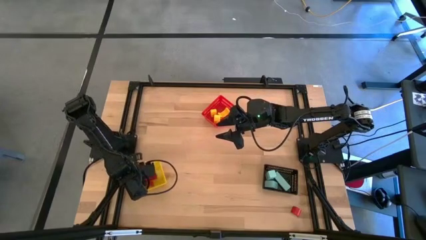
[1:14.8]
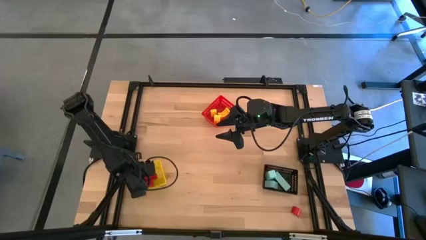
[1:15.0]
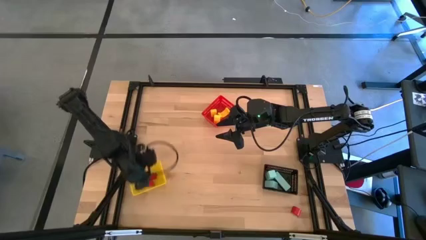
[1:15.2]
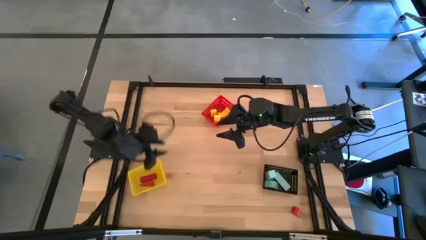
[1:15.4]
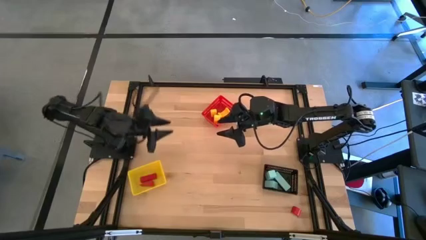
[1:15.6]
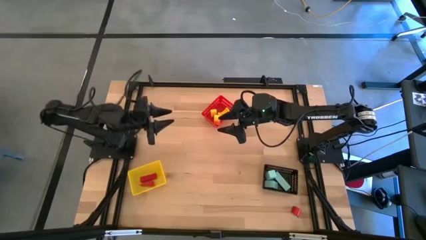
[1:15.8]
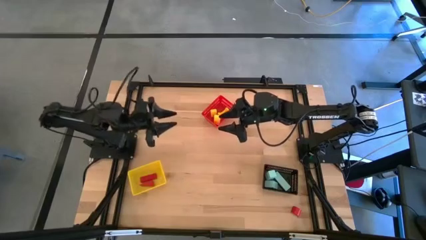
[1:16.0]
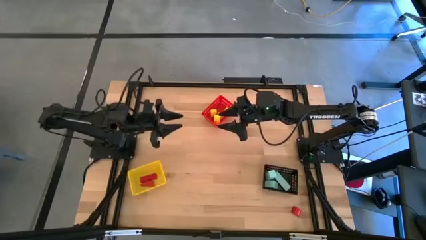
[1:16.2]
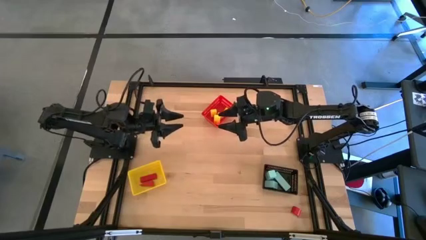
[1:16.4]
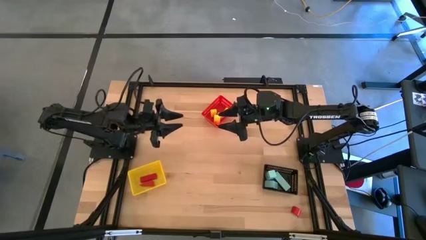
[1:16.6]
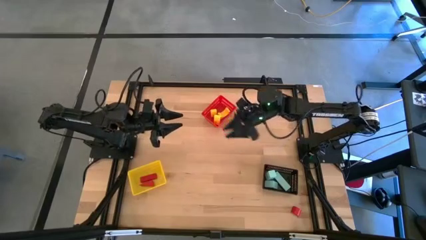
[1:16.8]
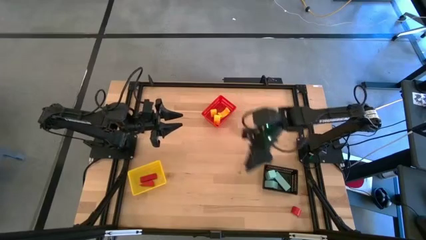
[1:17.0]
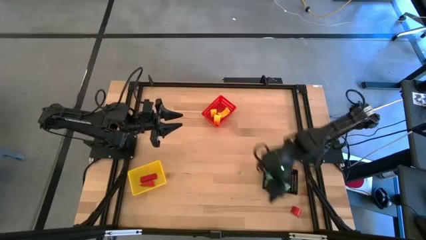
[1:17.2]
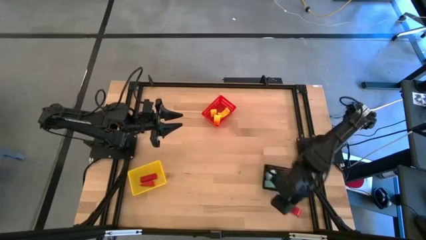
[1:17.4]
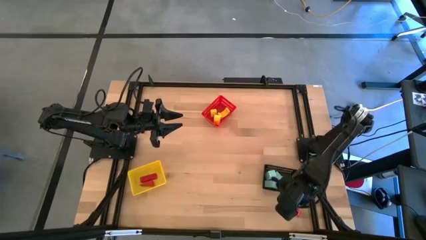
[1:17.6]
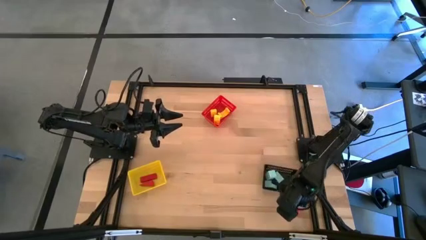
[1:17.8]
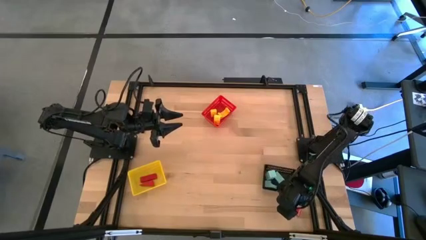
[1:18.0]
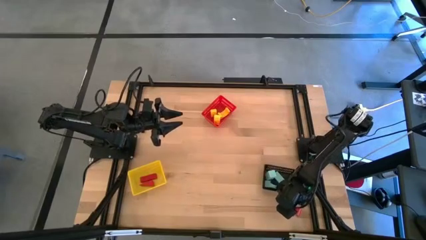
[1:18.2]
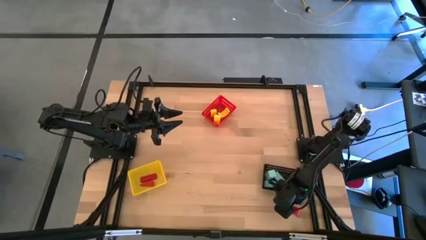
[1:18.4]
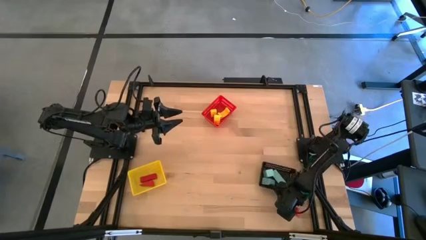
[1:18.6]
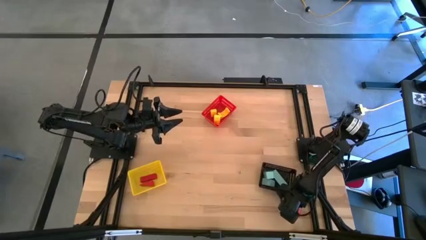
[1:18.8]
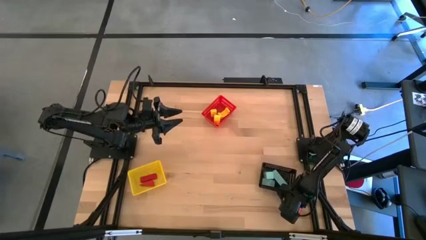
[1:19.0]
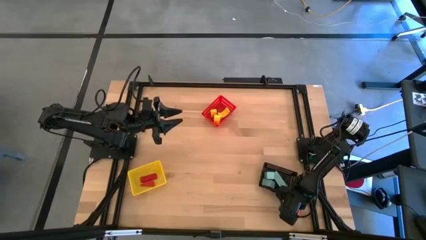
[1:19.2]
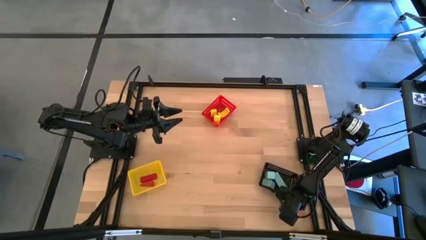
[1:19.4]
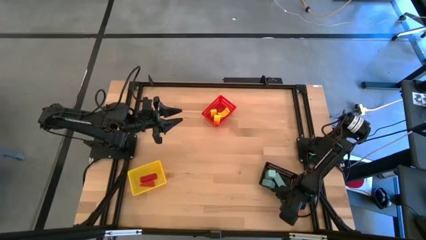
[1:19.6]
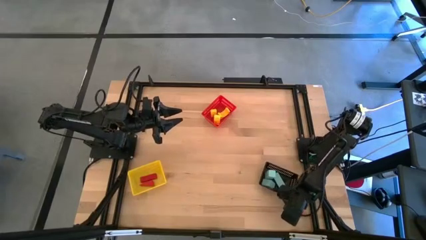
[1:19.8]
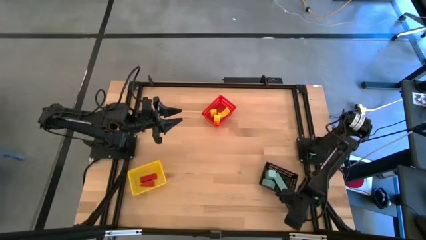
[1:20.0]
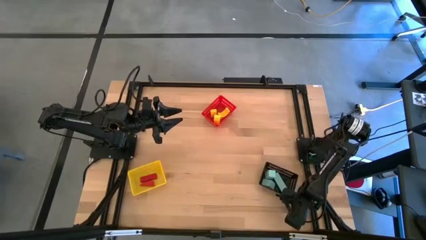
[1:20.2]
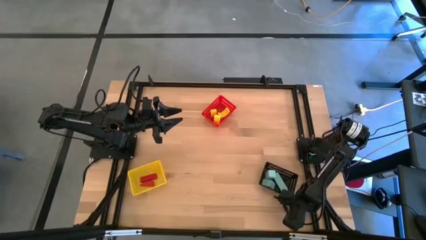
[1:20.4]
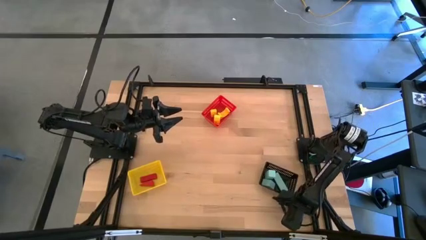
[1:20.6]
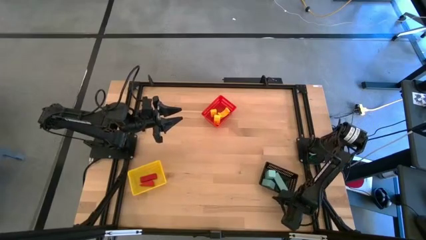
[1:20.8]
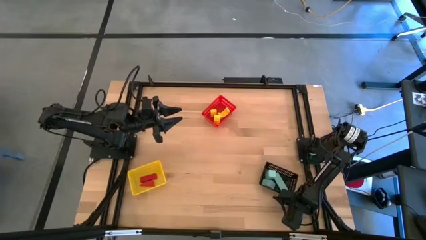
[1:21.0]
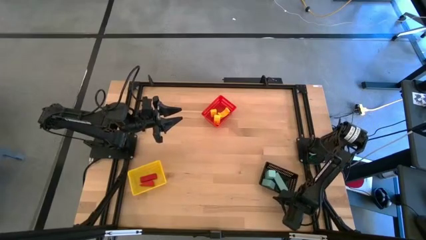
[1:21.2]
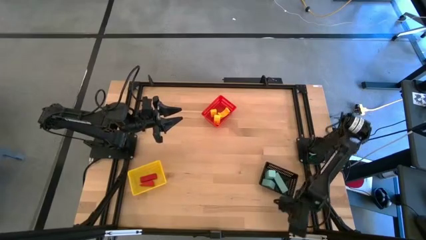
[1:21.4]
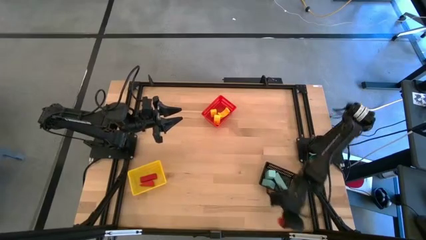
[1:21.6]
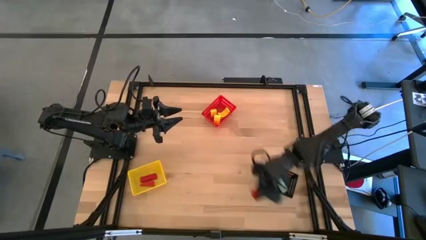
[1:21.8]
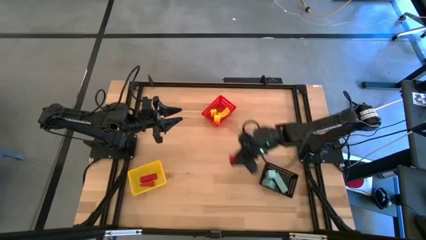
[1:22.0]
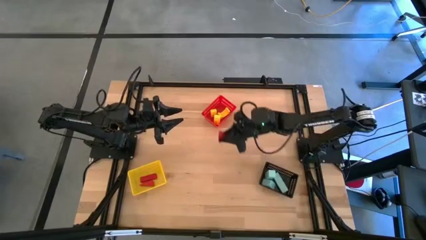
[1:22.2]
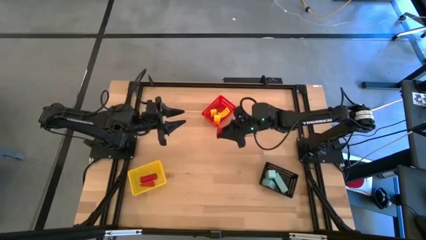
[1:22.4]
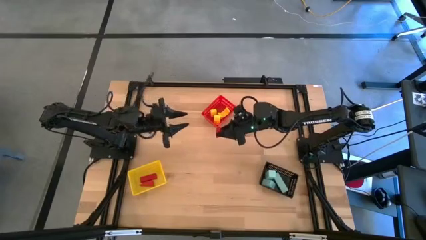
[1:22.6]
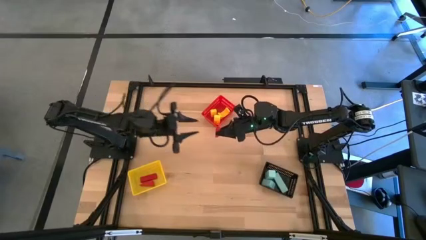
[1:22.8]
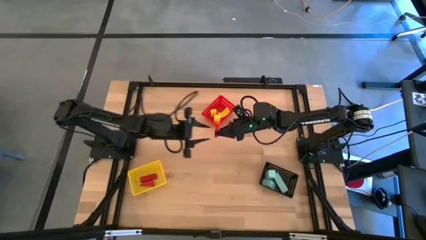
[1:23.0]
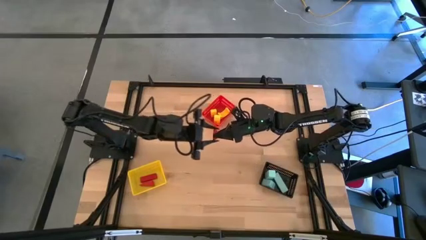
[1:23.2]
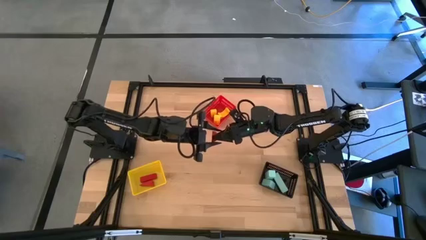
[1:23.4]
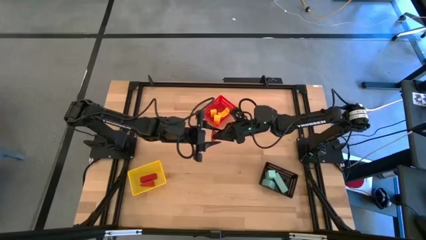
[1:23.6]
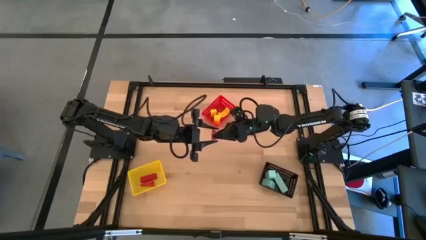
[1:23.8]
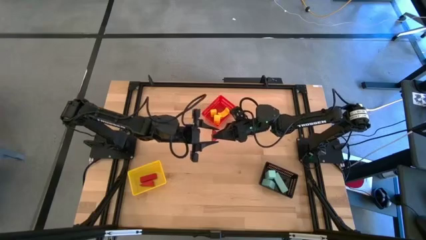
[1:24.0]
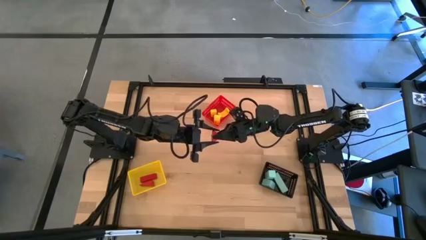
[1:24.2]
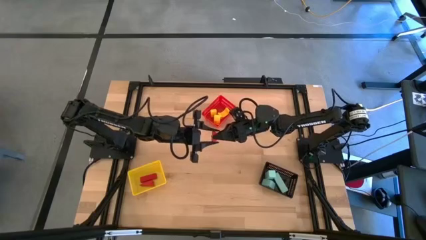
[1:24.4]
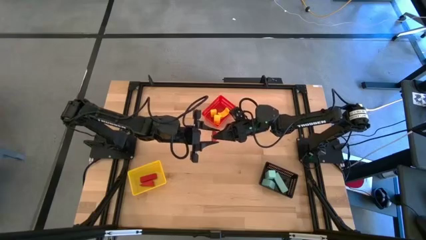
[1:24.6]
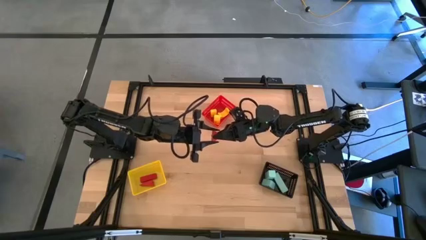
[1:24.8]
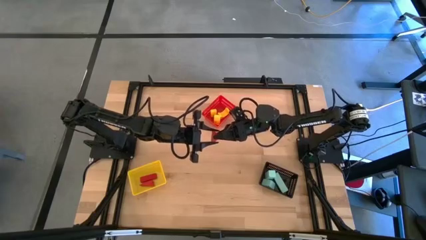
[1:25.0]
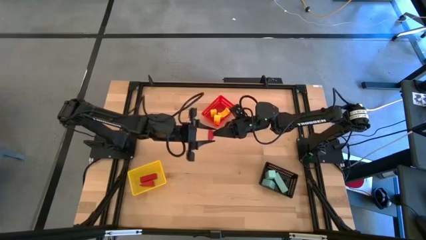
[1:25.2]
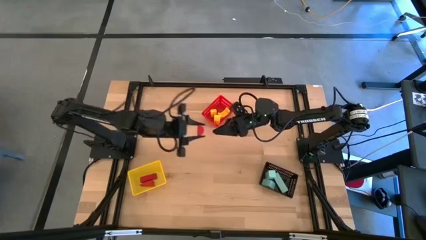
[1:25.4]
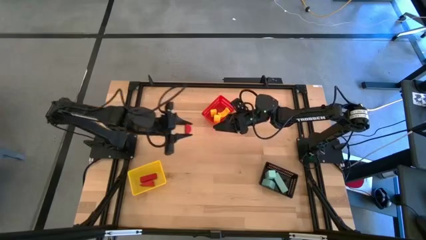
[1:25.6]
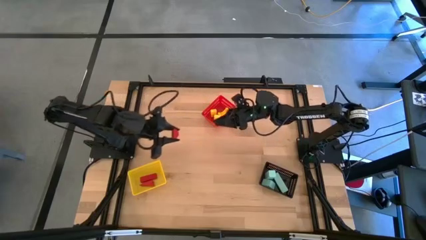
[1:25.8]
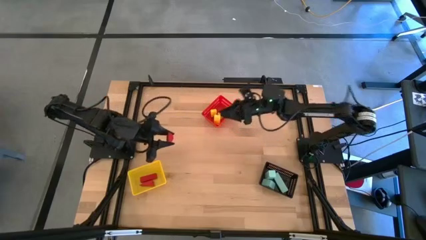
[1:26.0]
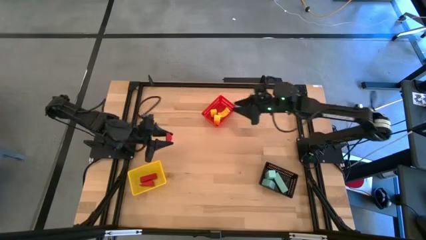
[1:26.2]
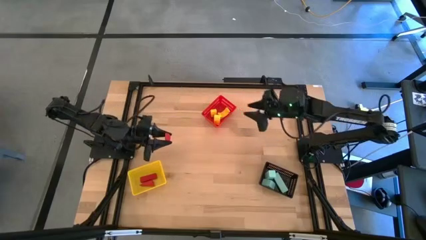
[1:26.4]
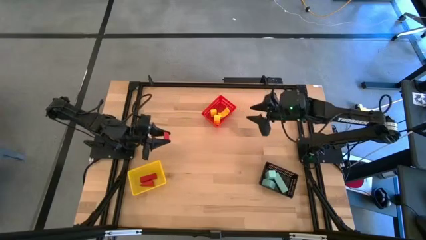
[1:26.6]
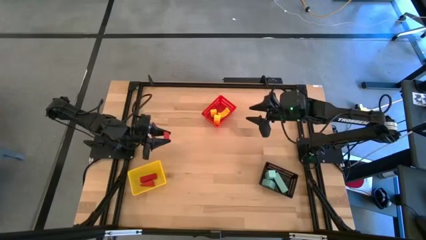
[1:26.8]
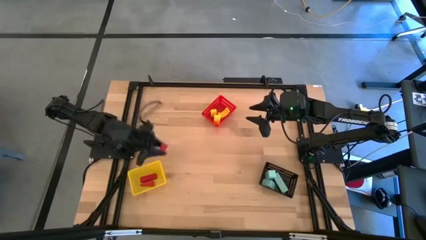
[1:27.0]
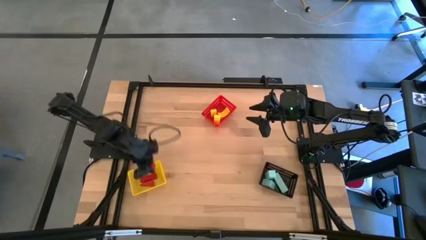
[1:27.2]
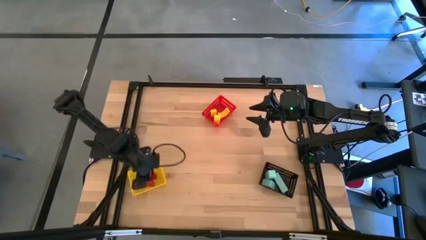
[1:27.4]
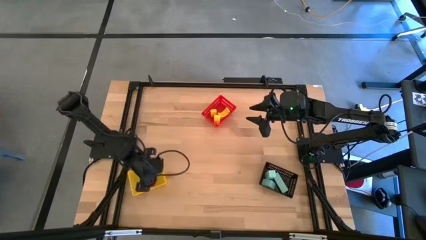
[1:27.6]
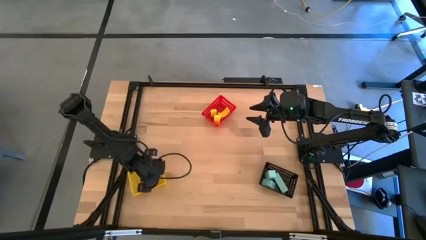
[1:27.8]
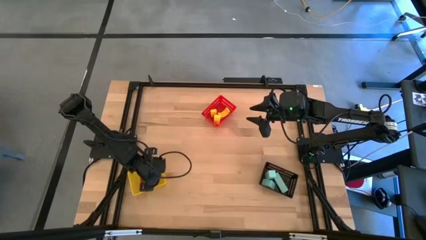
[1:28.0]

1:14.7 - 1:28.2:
Task: Sort & place blocks by color
Put the red block into the yellow bin

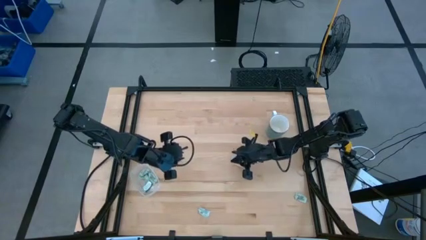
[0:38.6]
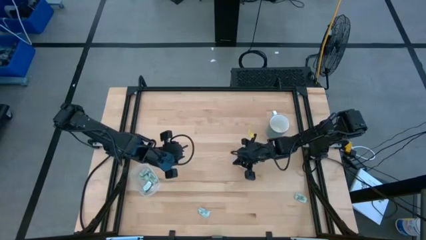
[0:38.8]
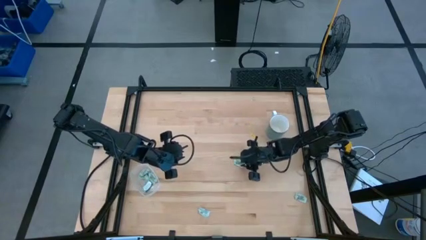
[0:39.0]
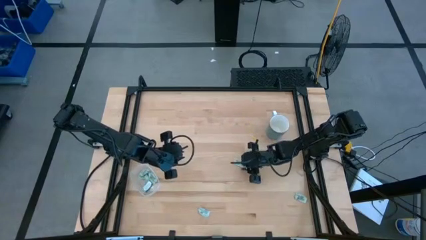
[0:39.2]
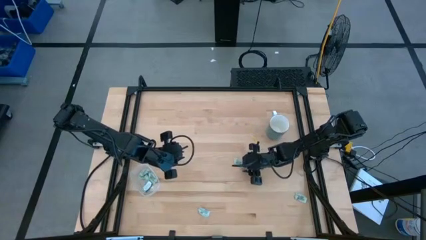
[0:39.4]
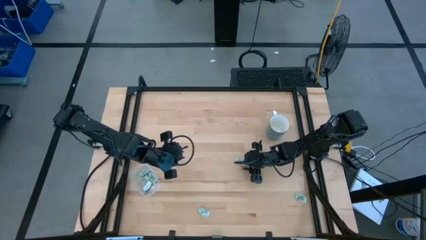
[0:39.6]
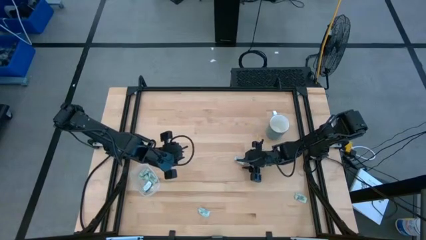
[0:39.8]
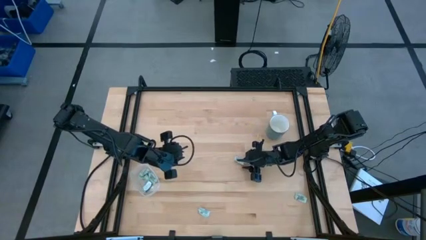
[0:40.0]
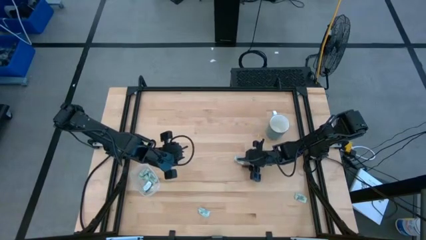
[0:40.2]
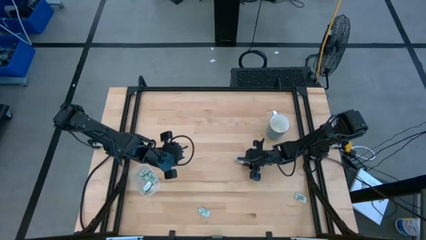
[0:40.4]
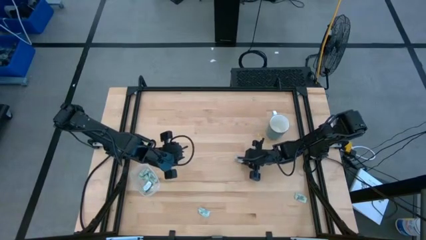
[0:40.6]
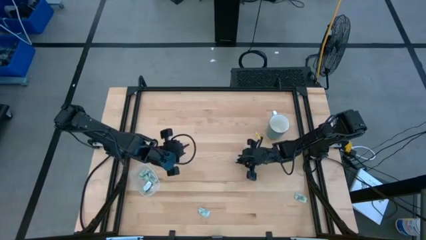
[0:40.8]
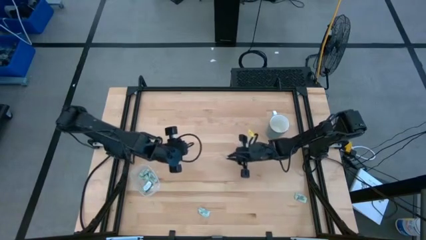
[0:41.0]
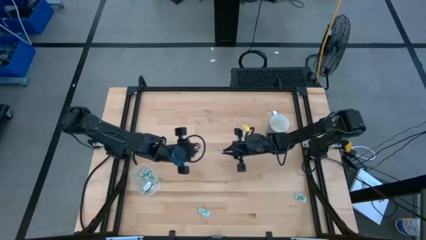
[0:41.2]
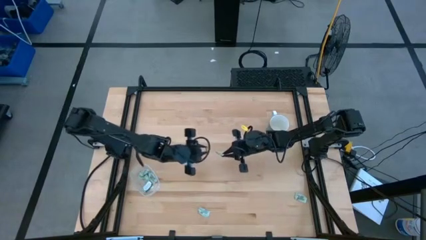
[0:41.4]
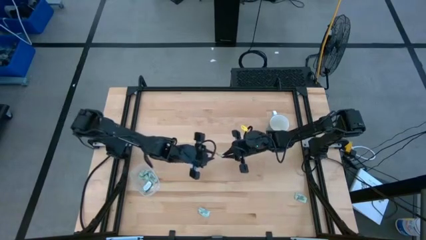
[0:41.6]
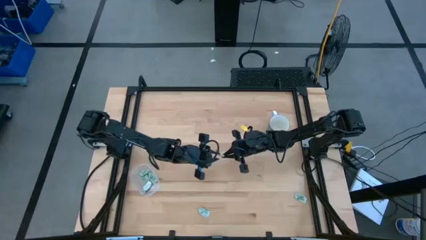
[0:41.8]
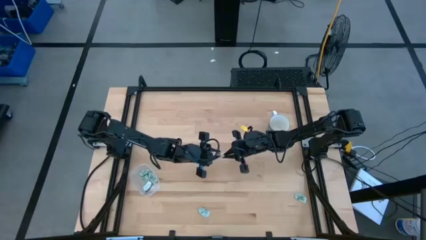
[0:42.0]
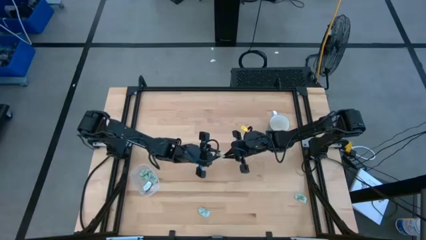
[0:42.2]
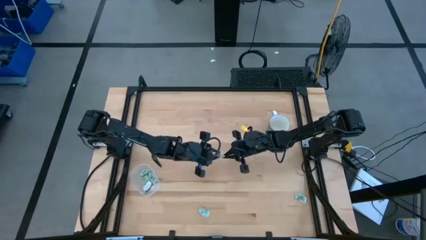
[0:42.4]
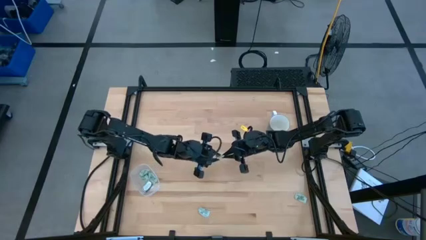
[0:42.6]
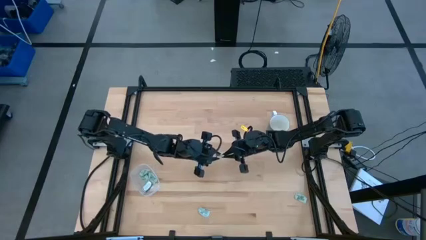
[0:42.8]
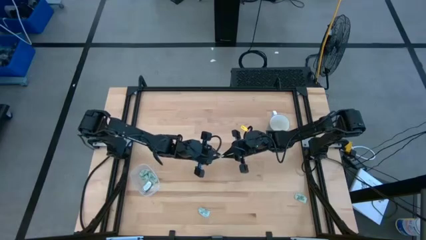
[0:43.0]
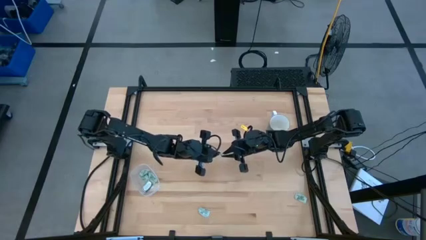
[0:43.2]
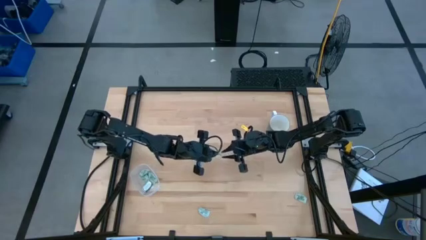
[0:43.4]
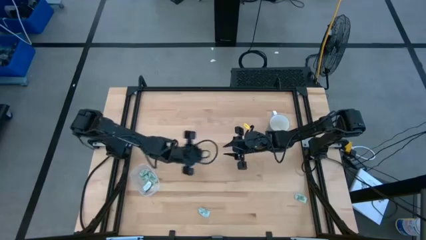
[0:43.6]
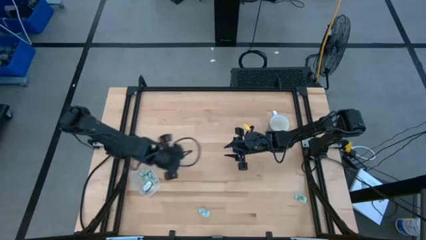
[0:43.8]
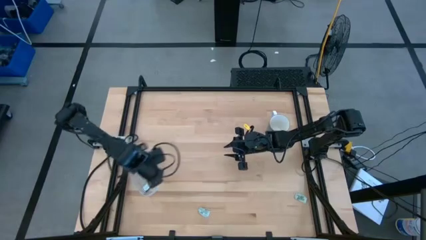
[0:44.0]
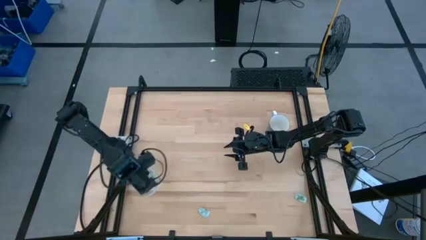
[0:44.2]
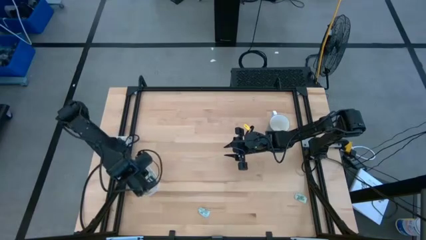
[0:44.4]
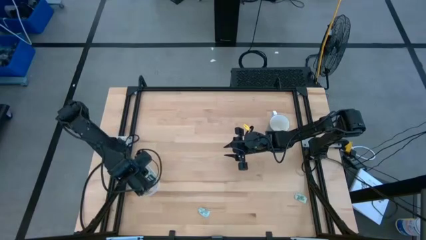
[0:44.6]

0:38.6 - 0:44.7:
Task: Pick and place Stevia / Truvia into bins
Put the stevia packet into the transparent container
